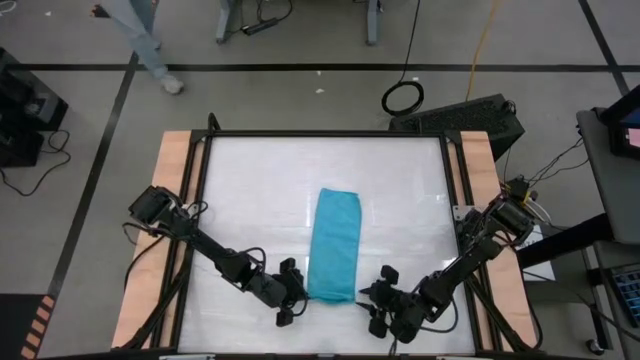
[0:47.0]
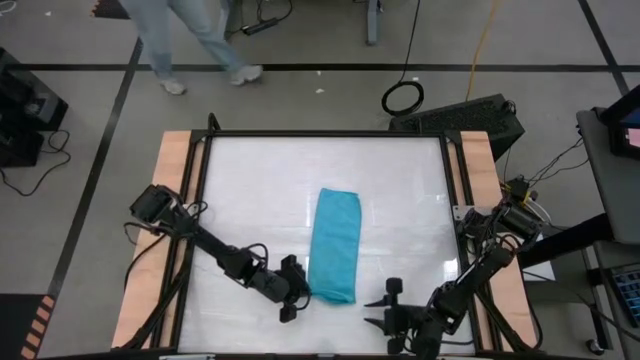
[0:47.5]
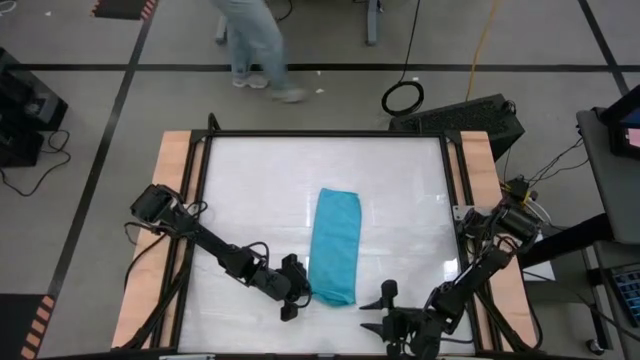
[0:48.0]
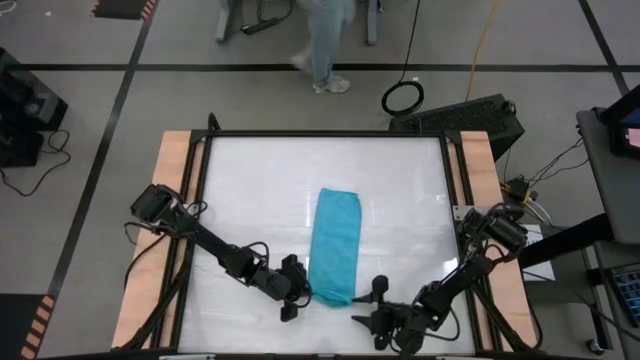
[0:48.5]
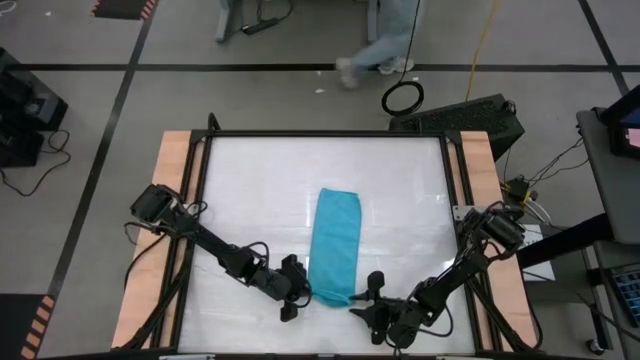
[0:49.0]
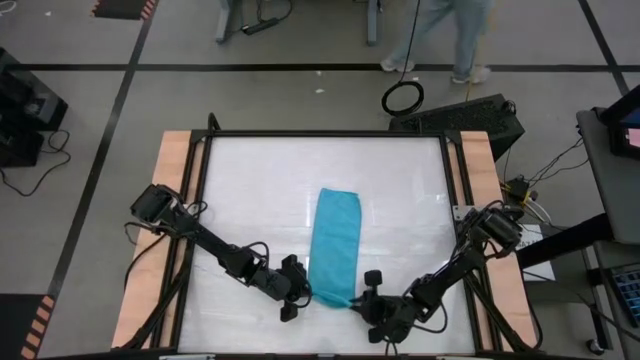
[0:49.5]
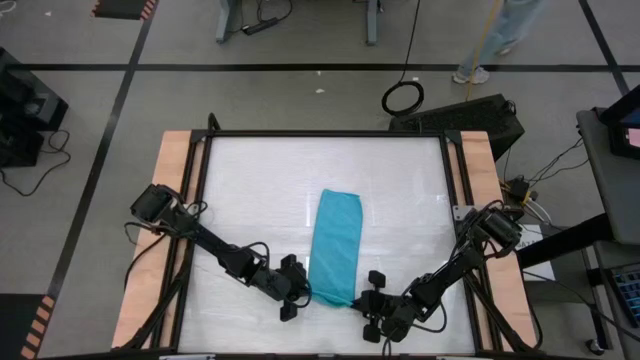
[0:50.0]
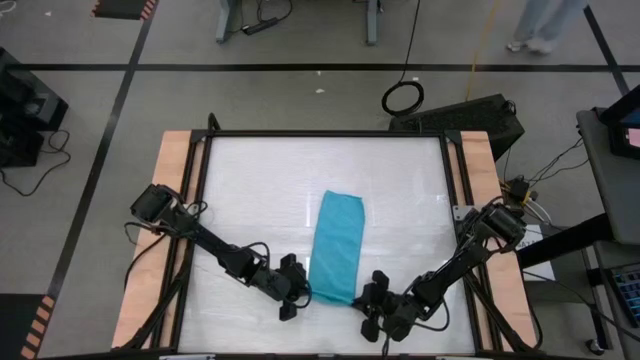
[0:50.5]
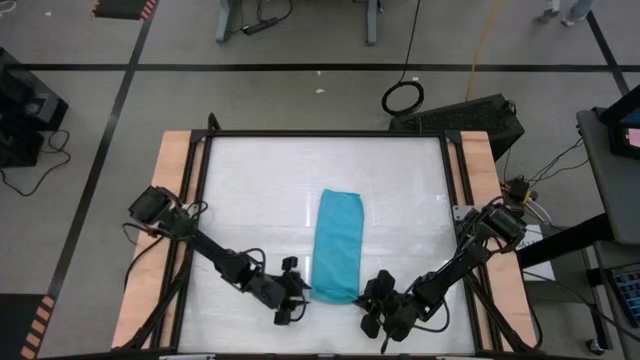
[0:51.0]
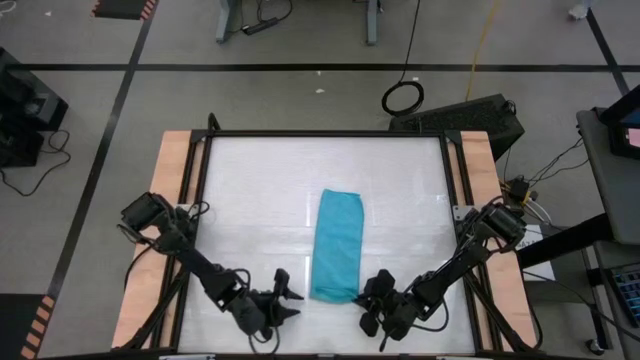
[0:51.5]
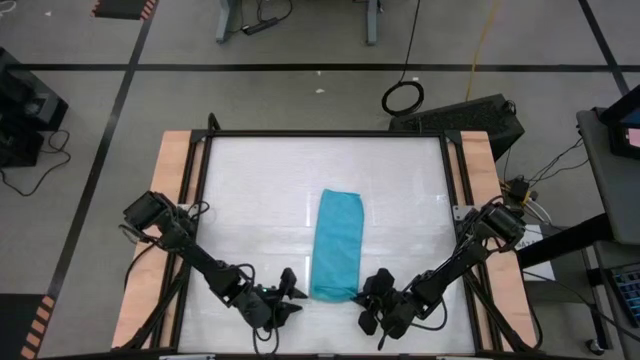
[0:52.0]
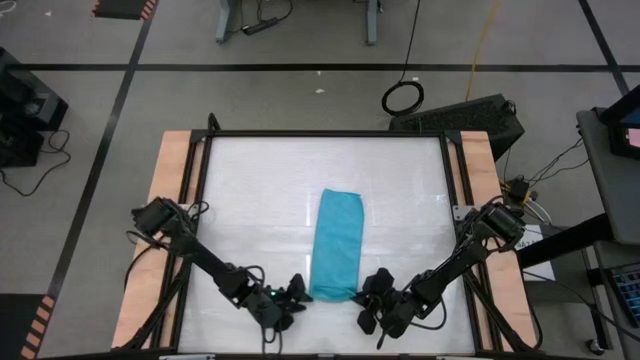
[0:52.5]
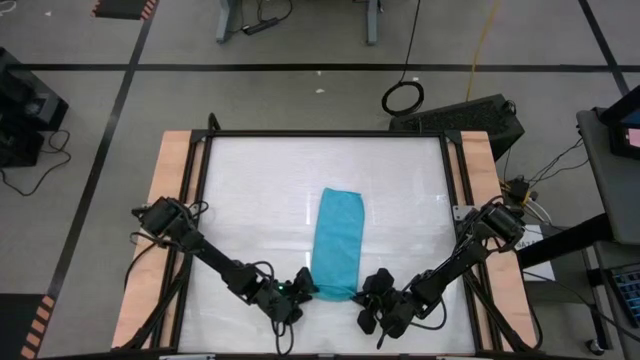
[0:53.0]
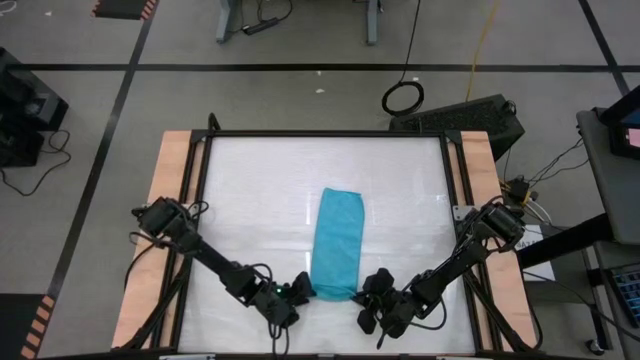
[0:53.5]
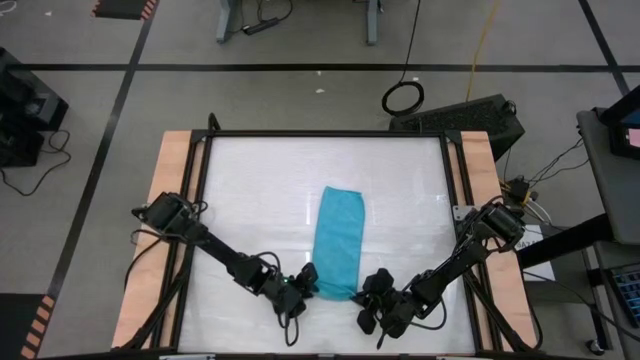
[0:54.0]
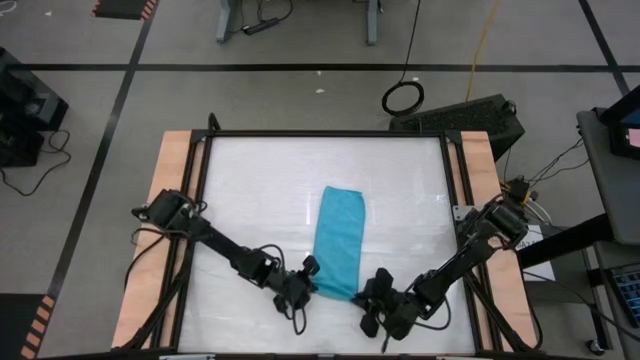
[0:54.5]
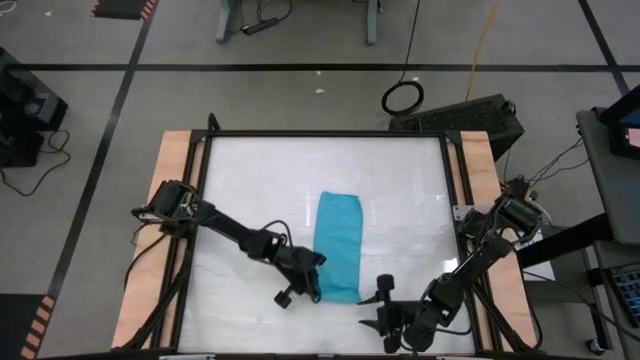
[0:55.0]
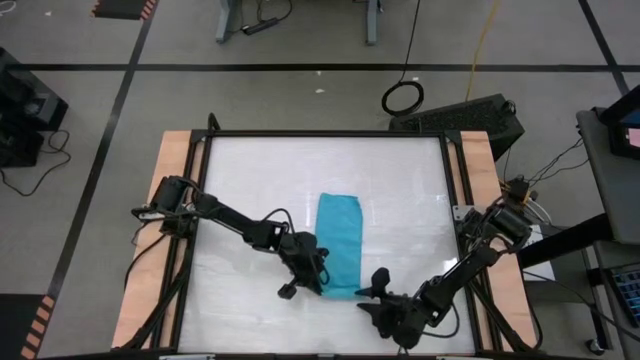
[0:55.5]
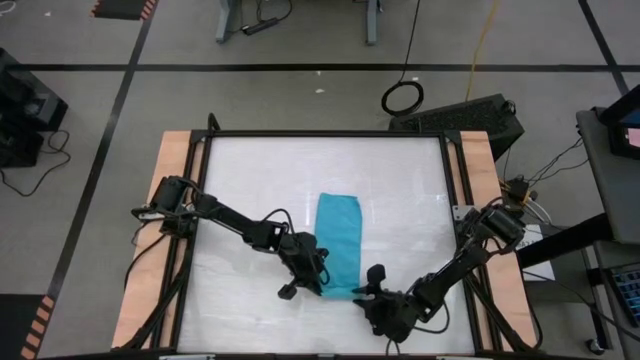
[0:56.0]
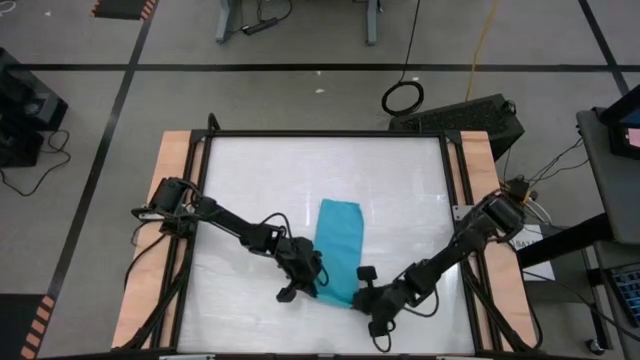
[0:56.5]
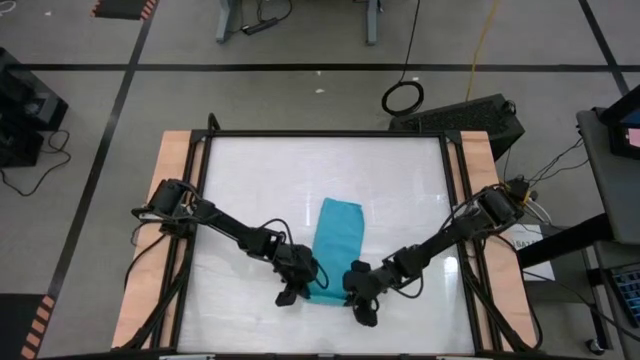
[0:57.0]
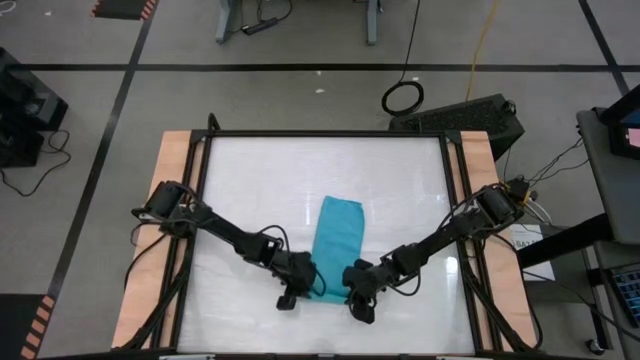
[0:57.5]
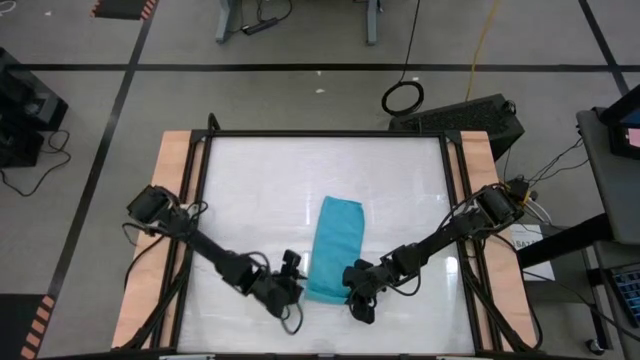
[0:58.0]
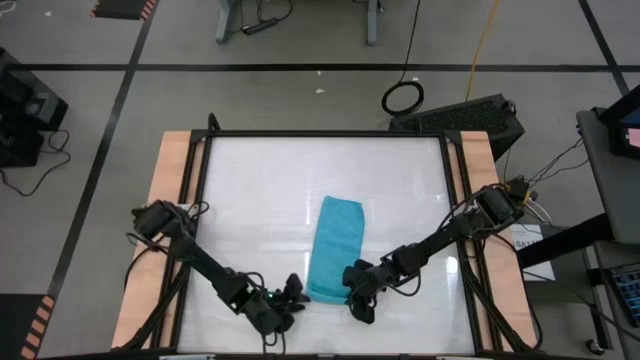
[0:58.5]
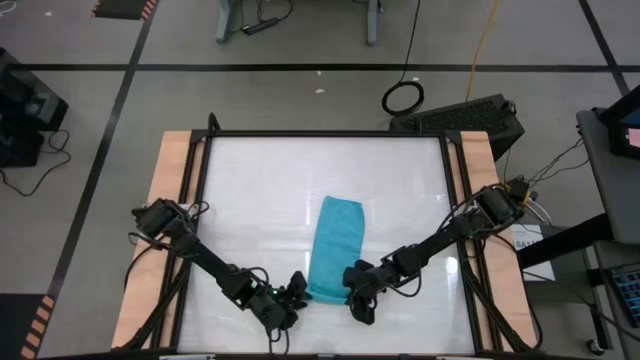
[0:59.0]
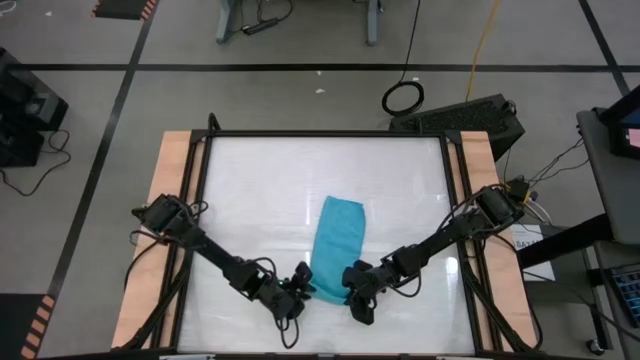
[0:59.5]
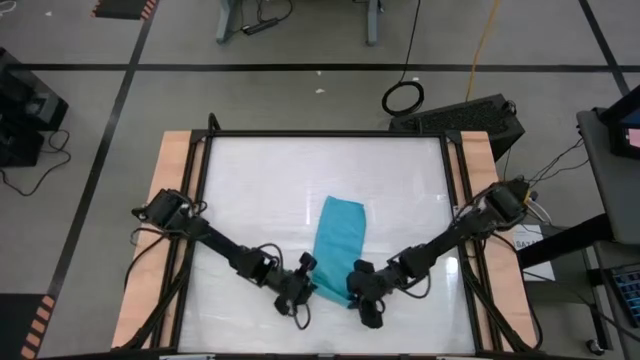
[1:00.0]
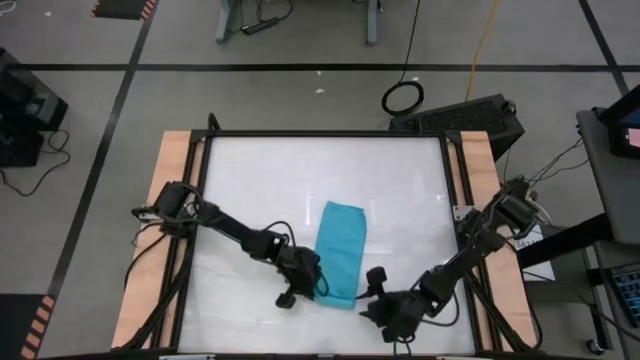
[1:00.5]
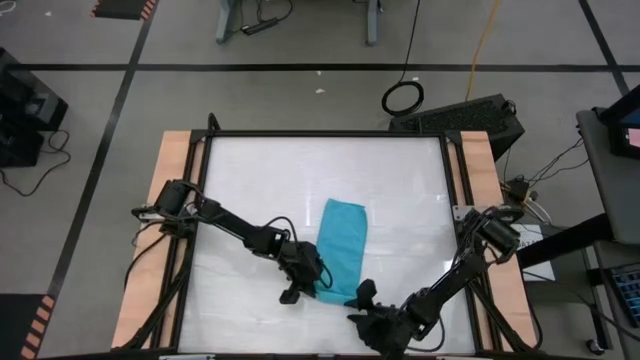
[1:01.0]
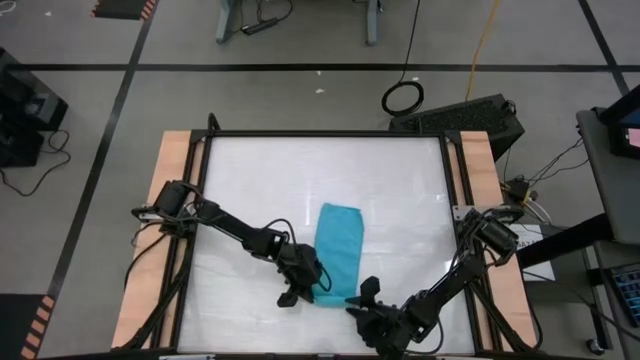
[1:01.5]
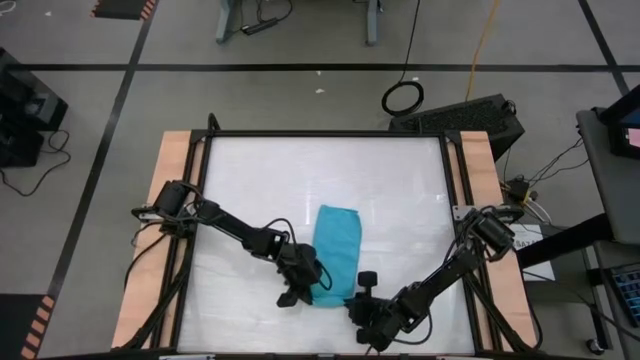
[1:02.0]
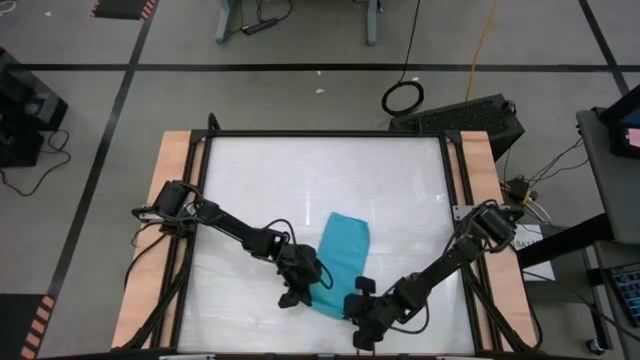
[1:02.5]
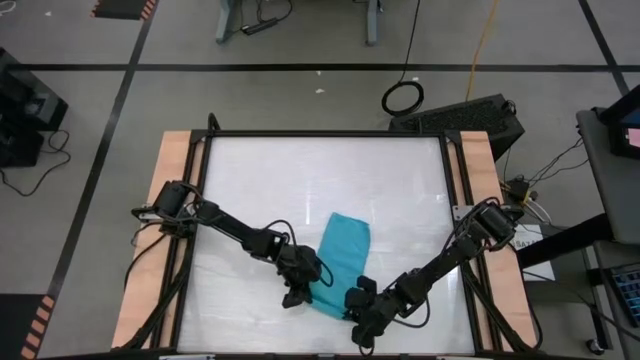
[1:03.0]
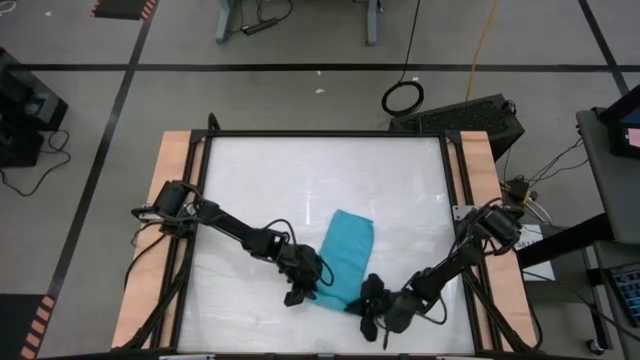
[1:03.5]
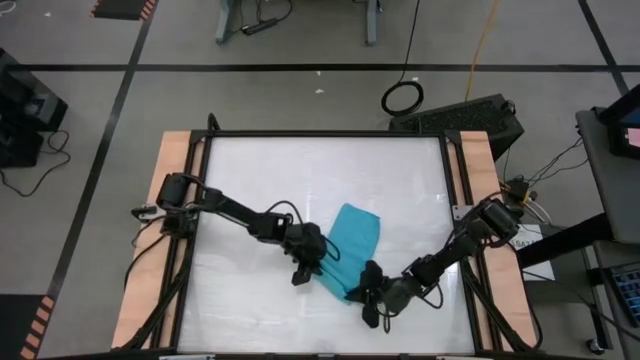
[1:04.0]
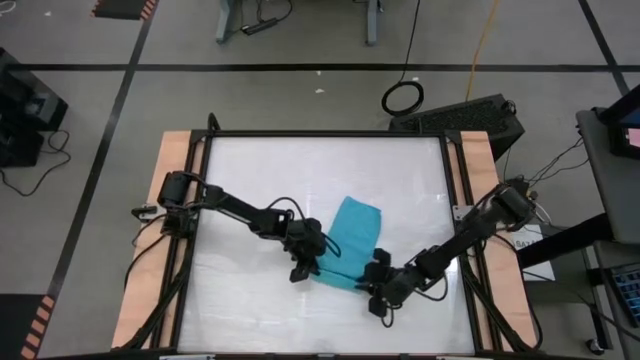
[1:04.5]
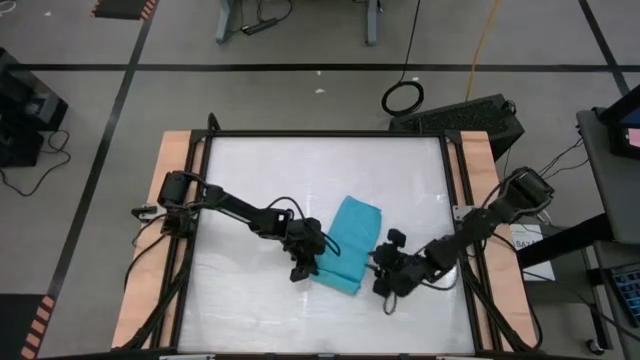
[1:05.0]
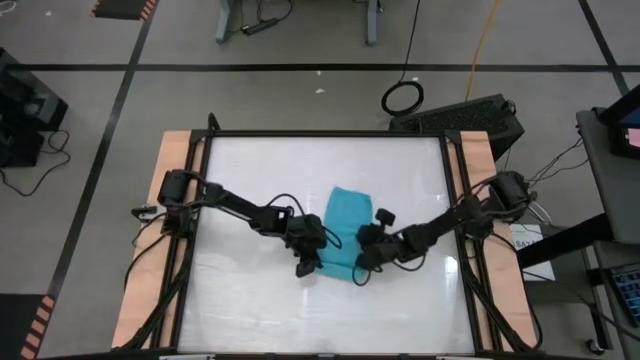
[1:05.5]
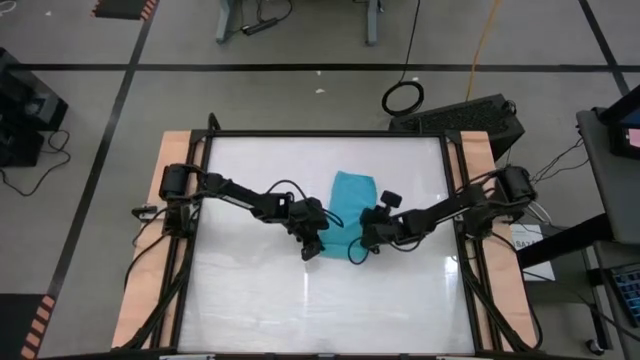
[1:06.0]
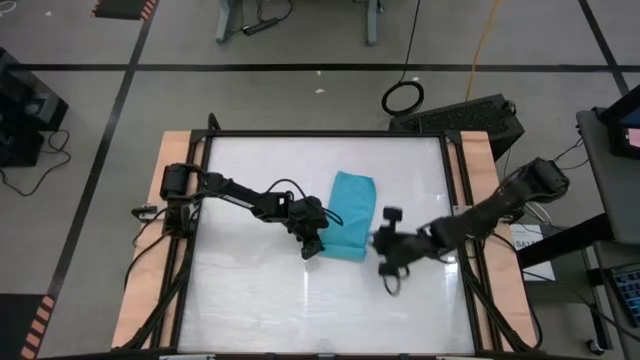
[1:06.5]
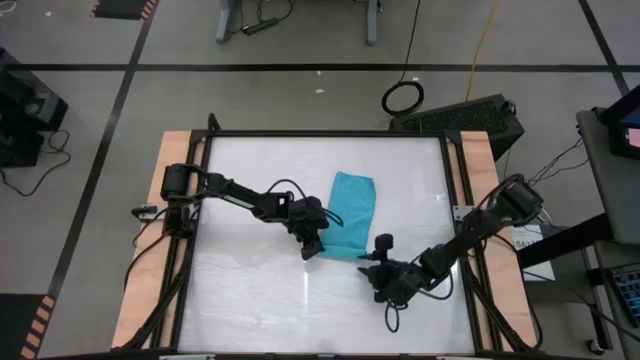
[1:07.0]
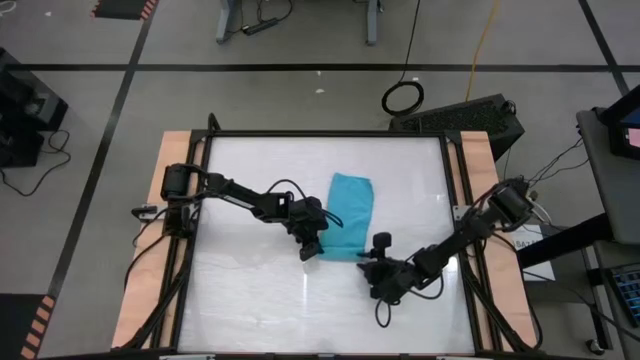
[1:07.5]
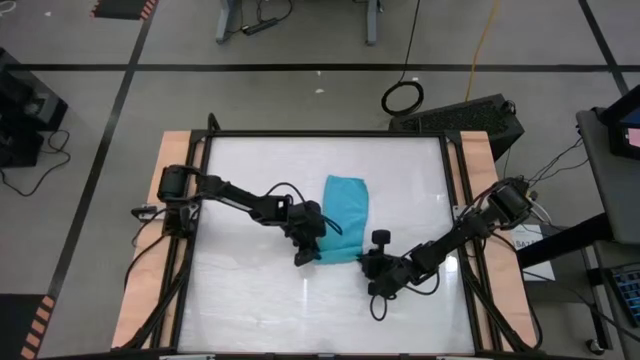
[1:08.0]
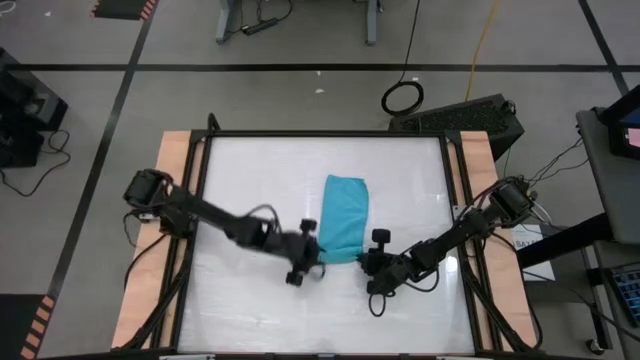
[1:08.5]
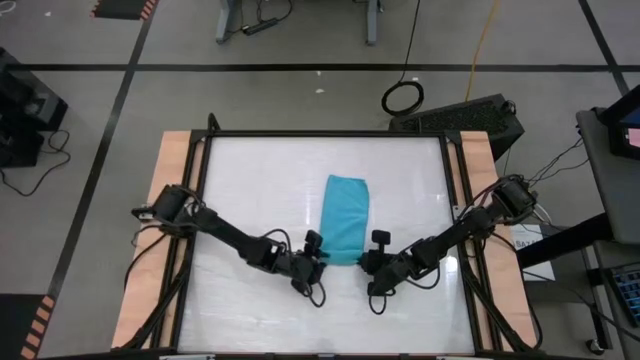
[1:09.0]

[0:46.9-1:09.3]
Task: Roll towel into tight, uniform cylinder
Roll the blue towel
